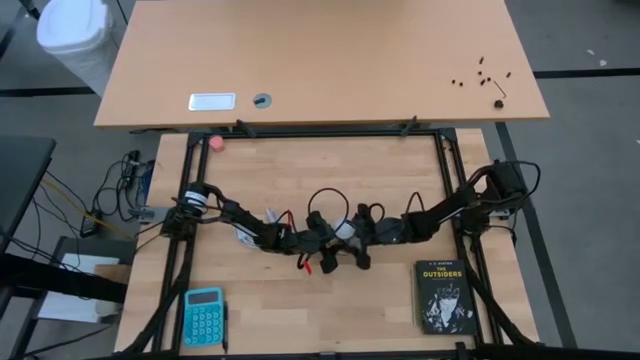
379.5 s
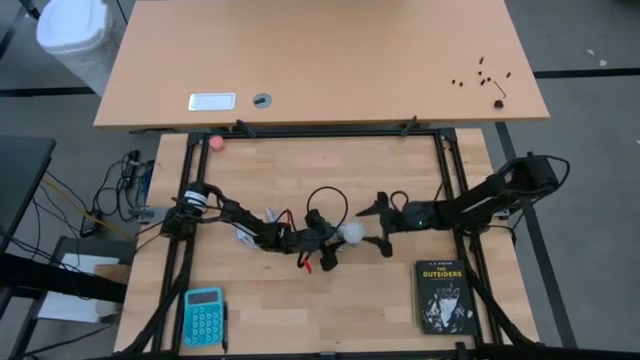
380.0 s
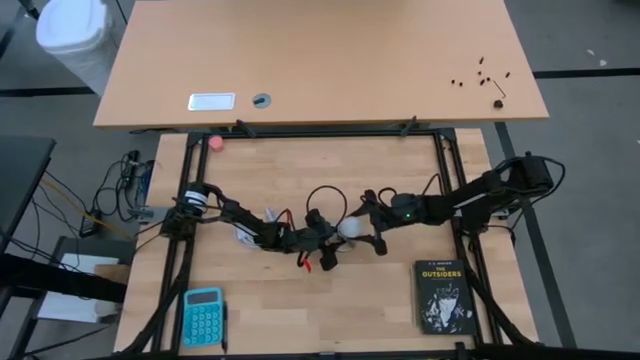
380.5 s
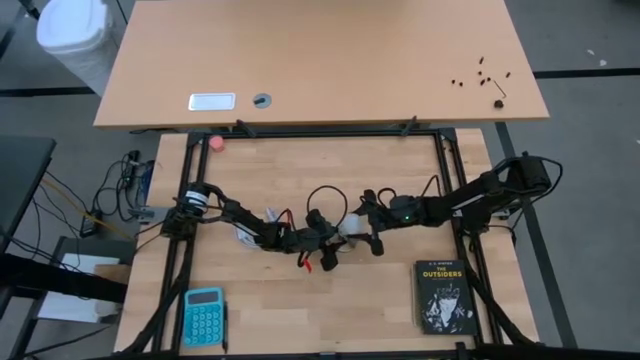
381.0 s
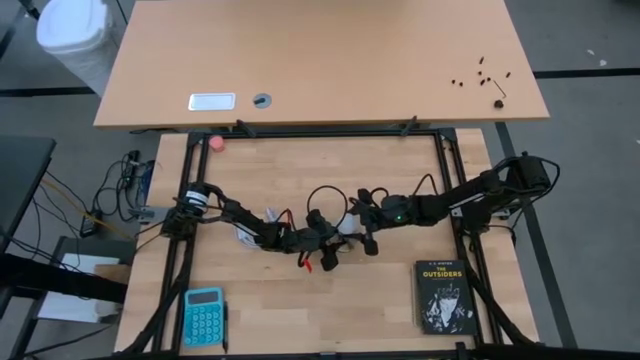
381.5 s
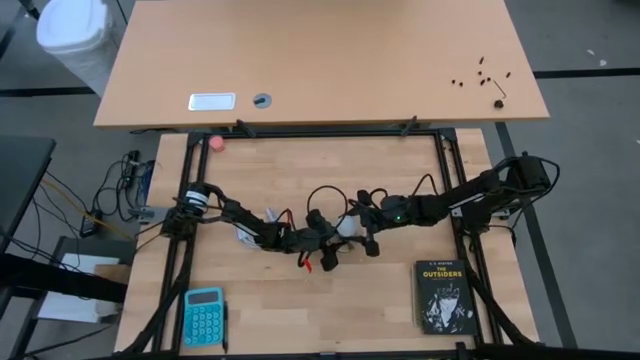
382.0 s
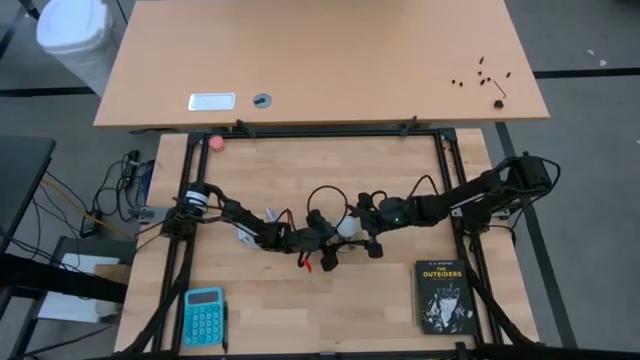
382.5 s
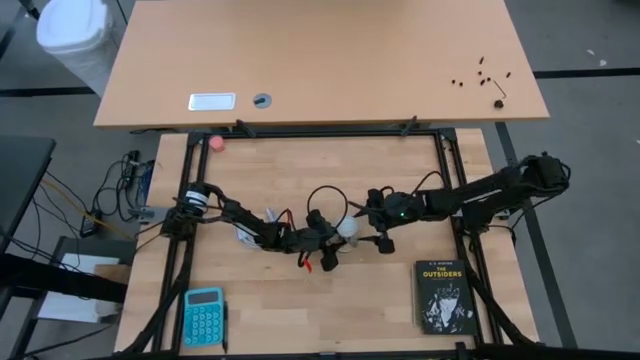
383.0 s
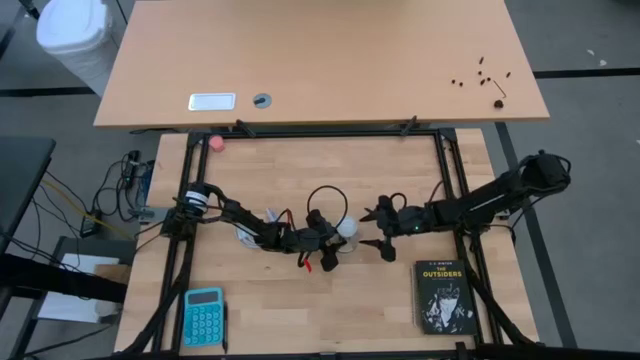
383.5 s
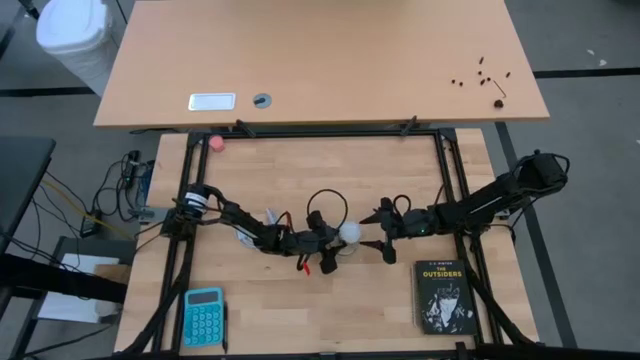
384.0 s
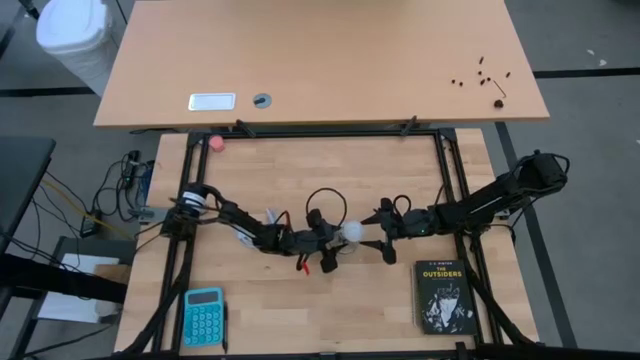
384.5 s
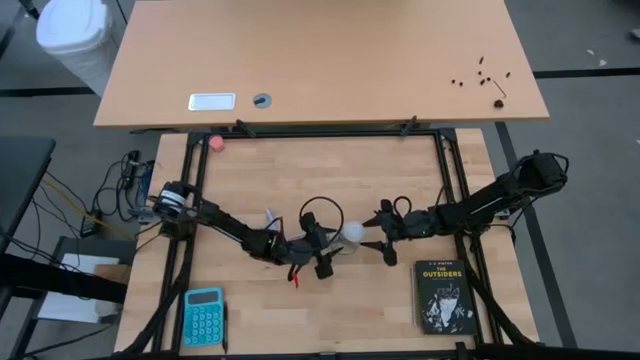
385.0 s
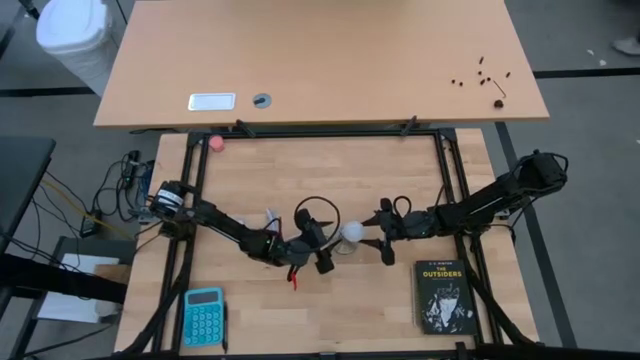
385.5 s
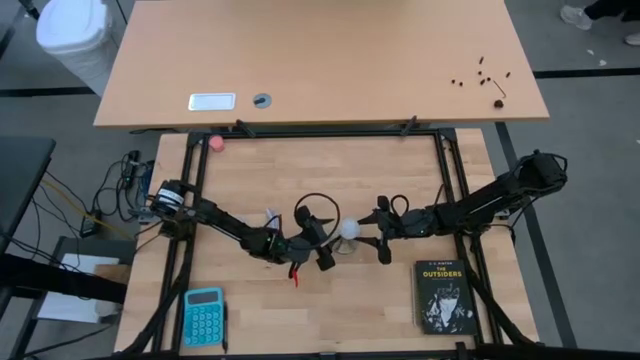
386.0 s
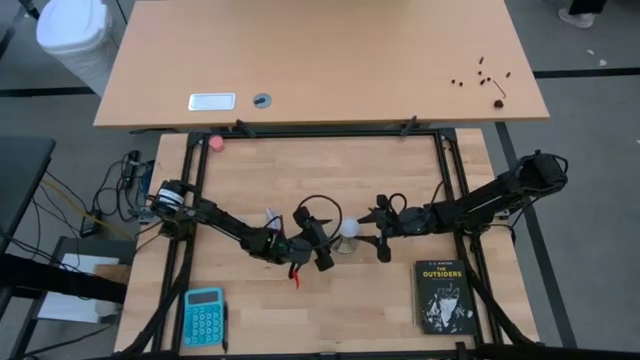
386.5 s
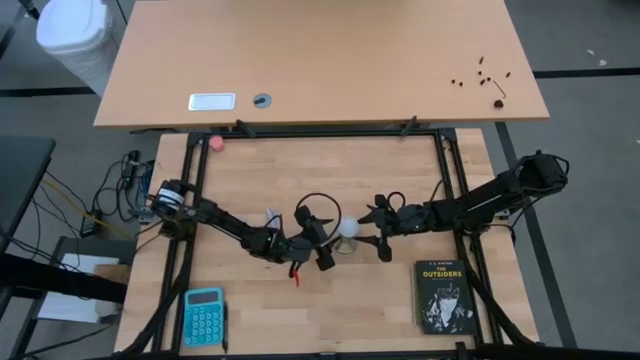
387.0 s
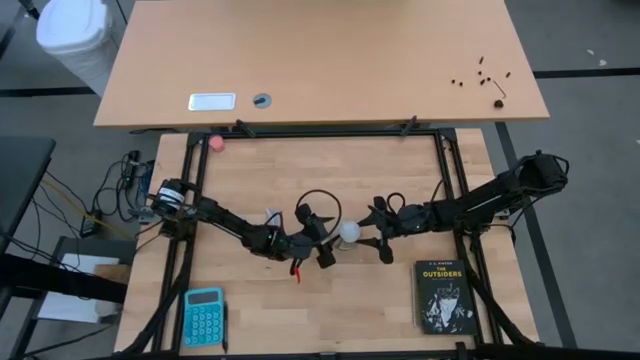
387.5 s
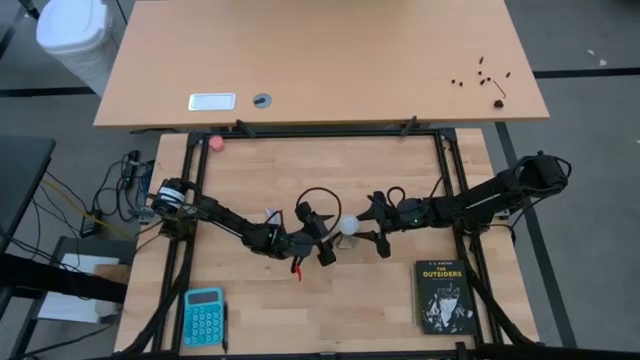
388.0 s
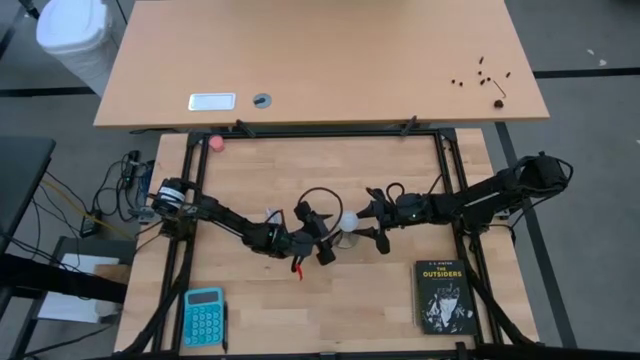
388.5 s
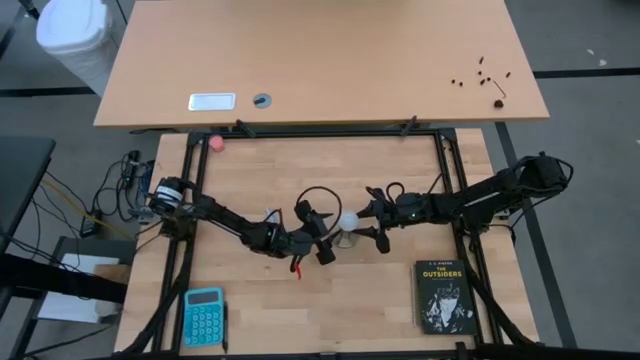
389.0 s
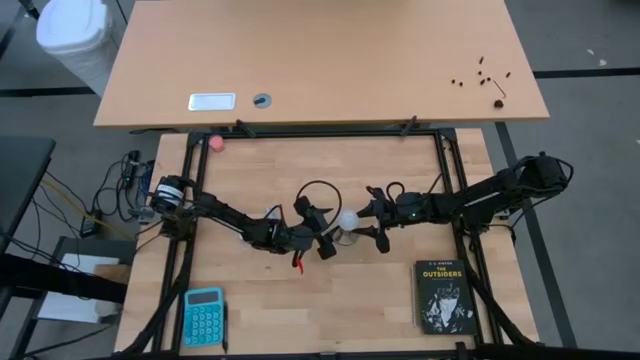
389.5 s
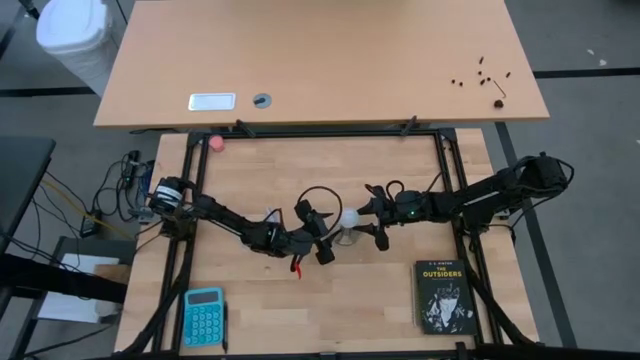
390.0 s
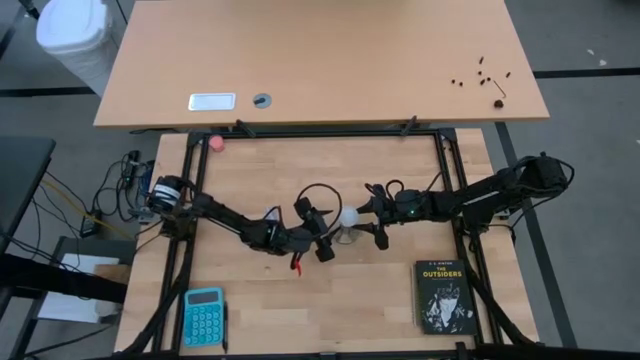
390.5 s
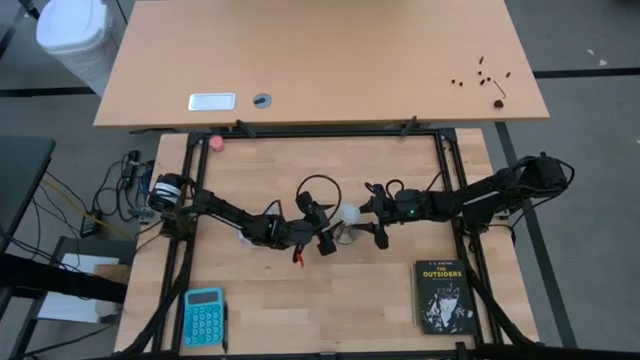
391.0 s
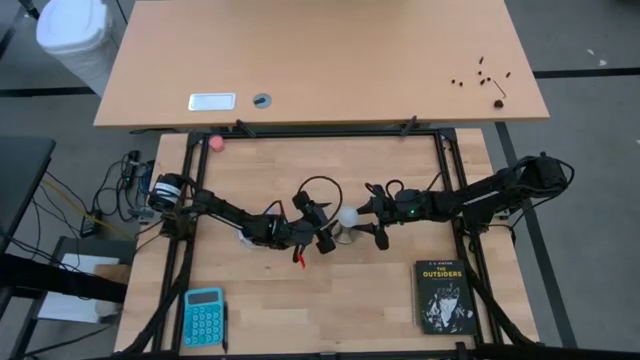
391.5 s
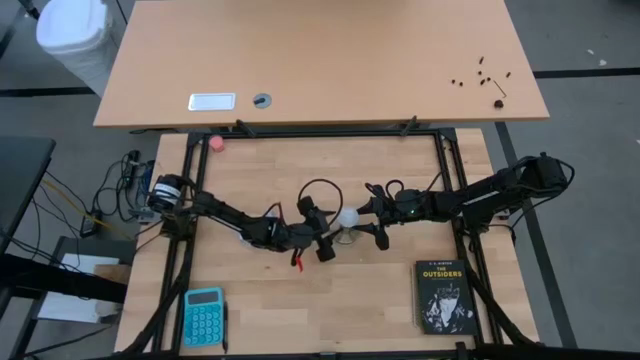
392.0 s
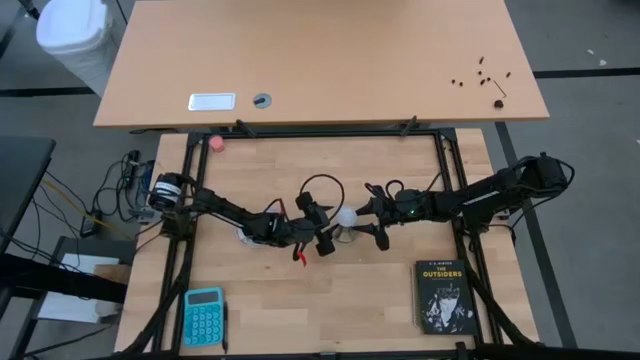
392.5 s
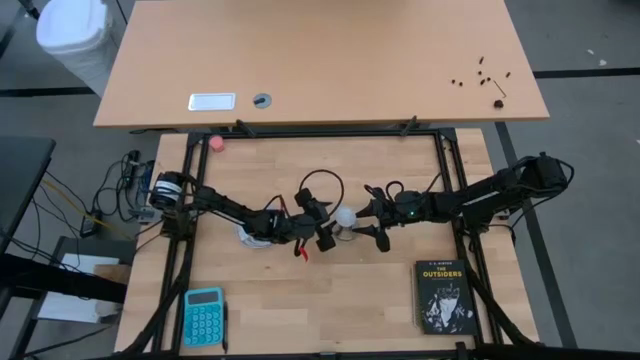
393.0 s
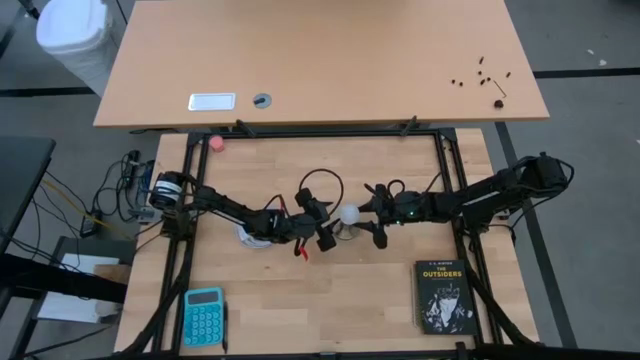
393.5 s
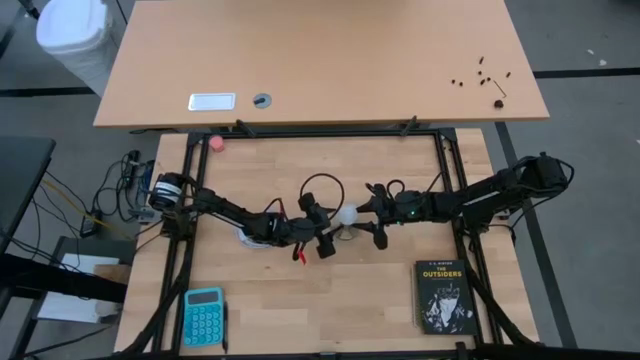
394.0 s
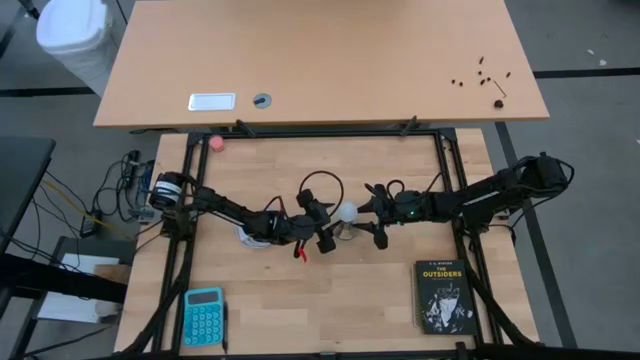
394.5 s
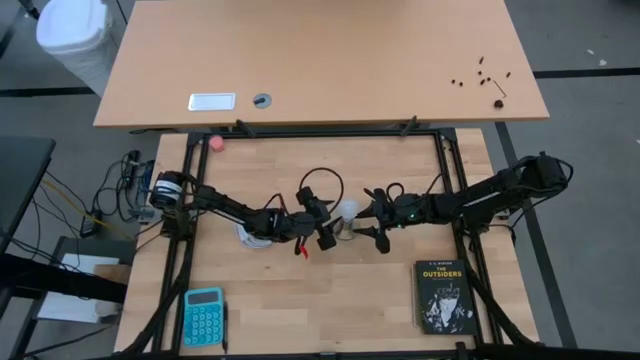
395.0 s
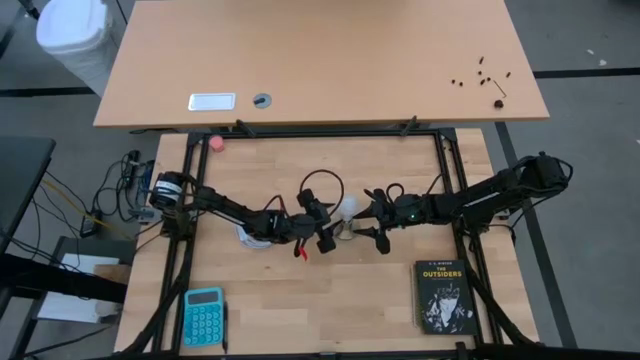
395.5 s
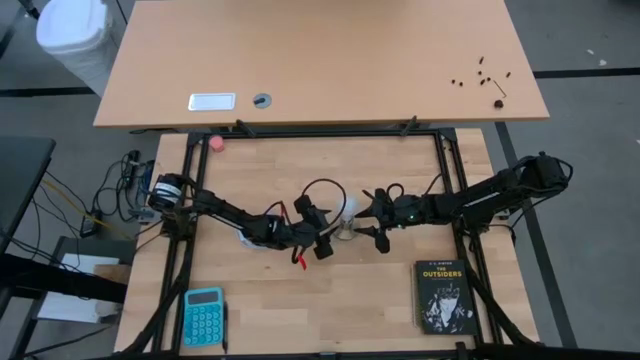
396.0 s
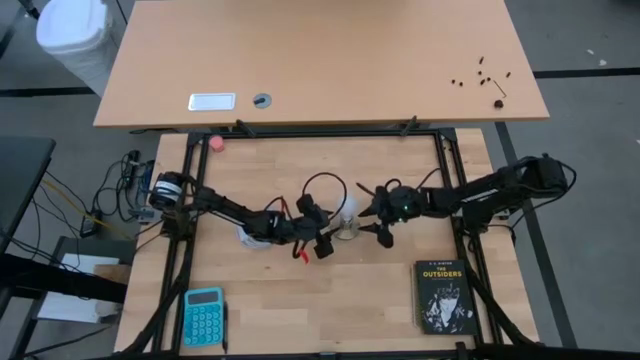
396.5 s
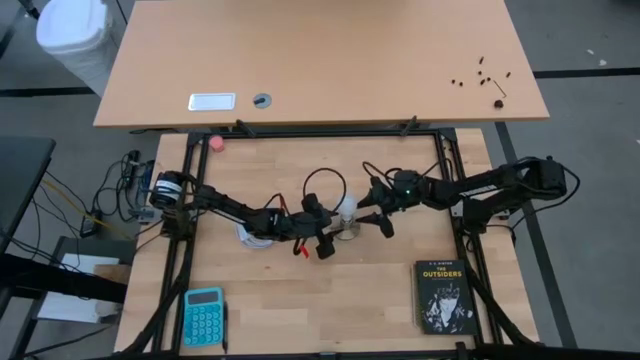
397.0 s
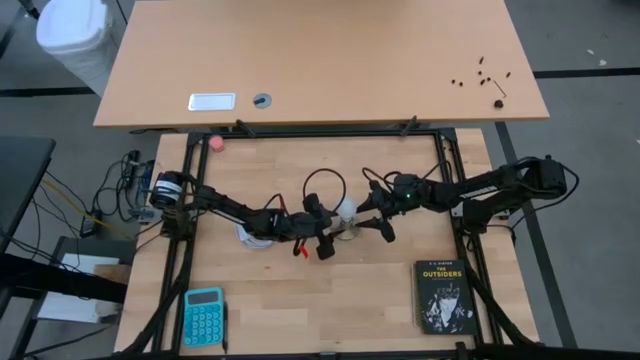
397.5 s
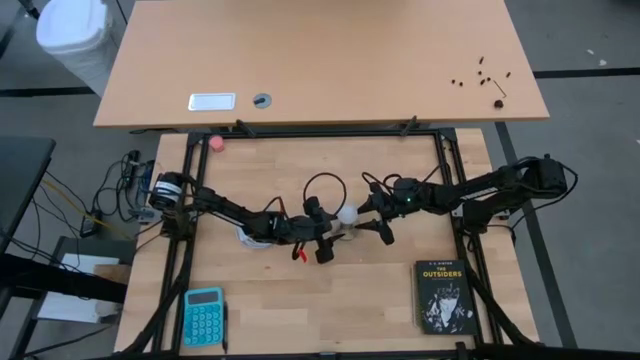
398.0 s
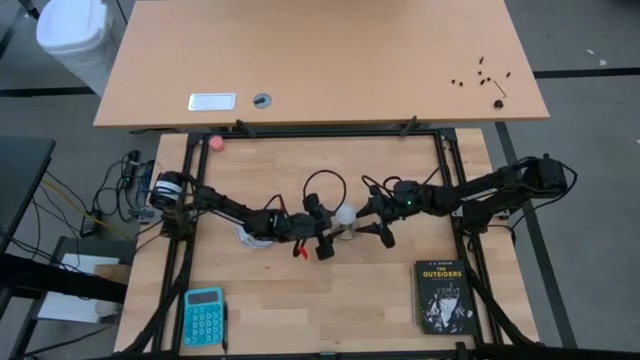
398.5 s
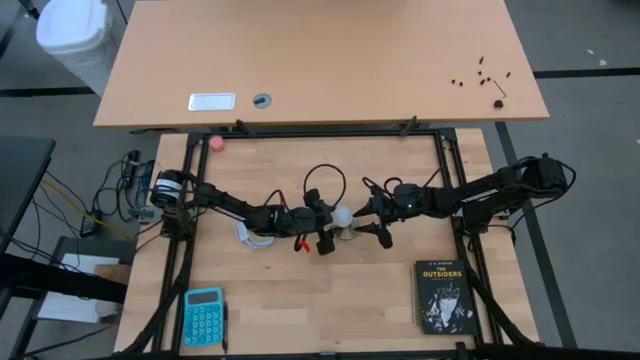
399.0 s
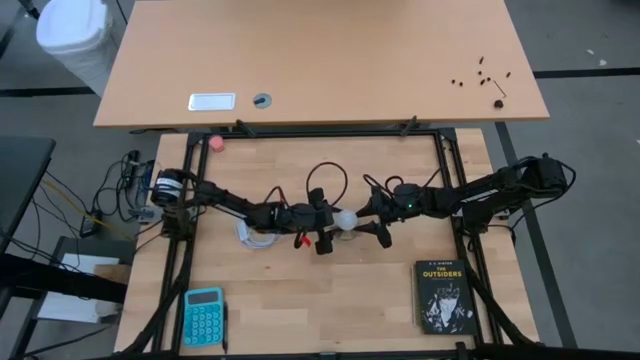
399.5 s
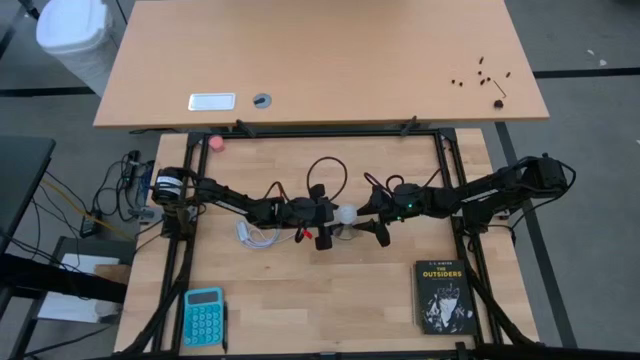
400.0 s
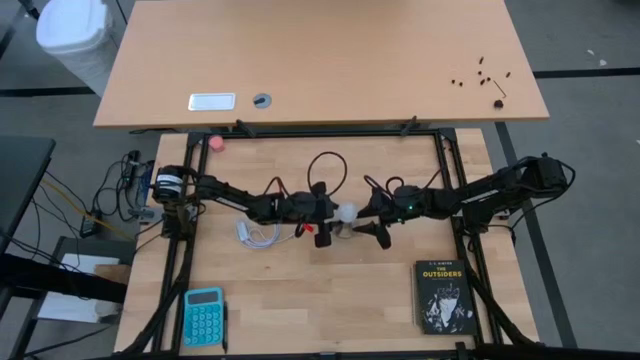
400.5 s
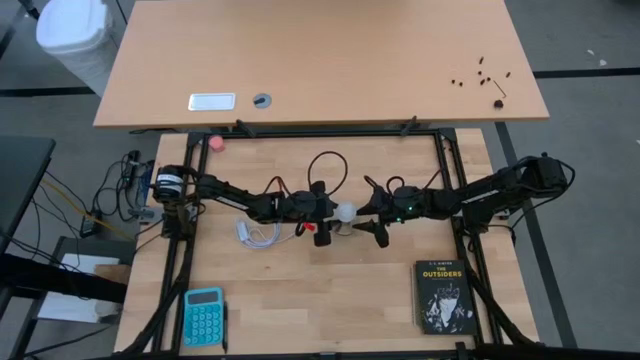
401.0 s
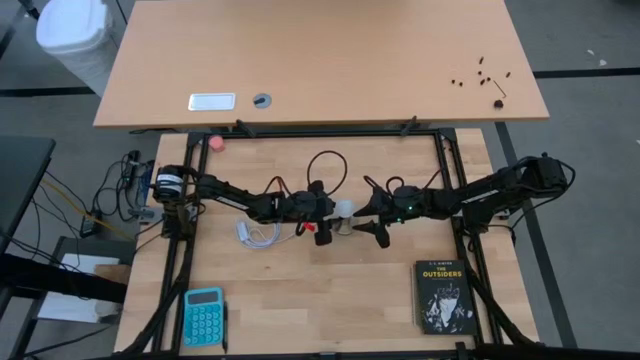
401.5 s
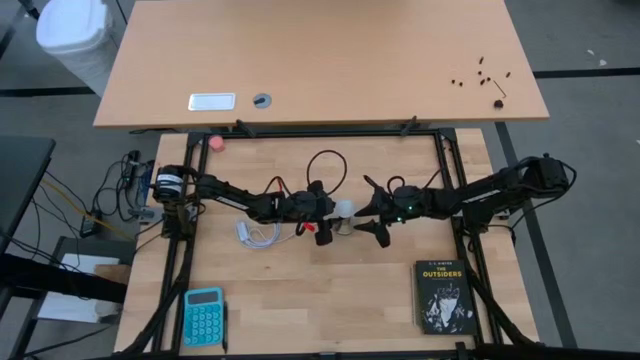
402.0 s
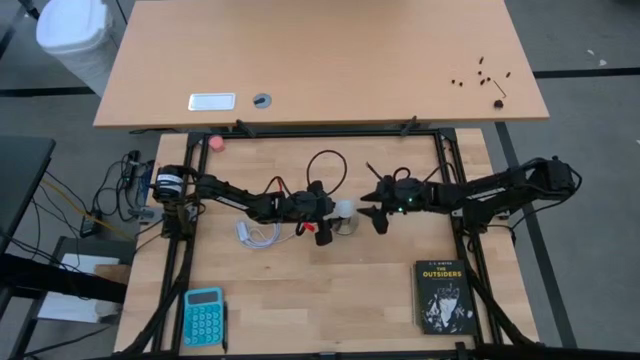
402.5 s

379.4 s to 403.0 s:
Task: Screw lightbulb
Insert the white lightbulb into the silver lamp
